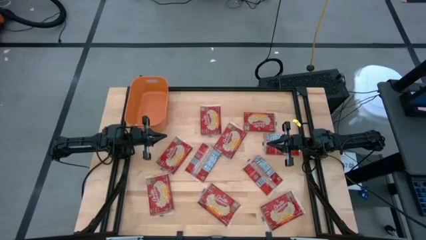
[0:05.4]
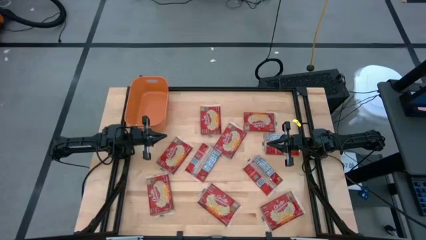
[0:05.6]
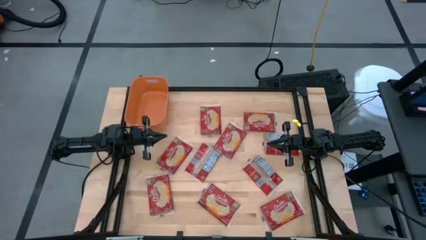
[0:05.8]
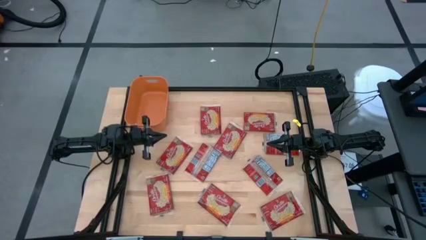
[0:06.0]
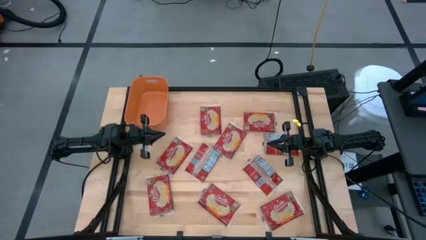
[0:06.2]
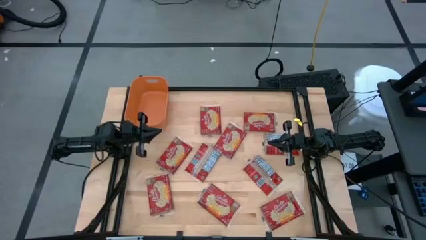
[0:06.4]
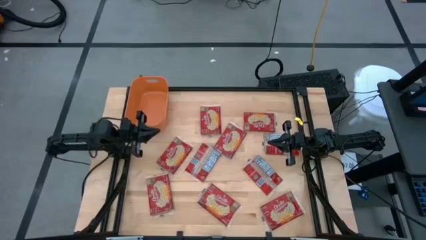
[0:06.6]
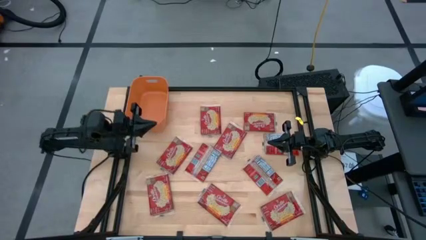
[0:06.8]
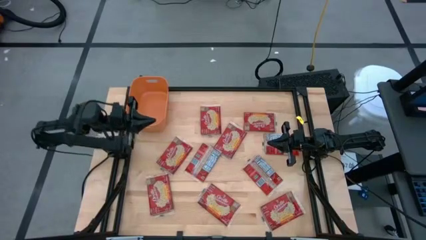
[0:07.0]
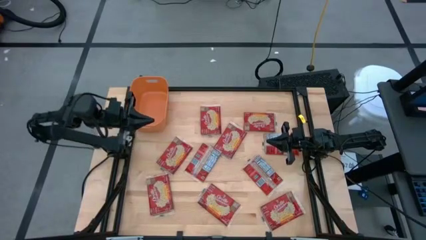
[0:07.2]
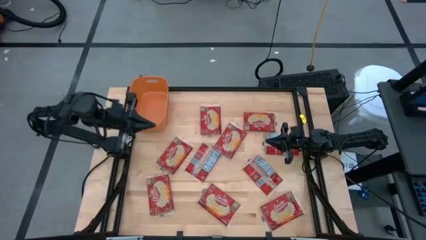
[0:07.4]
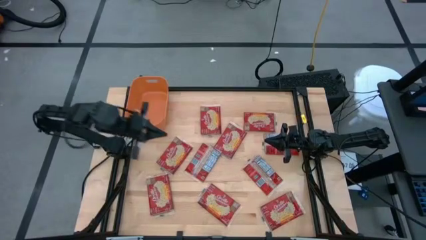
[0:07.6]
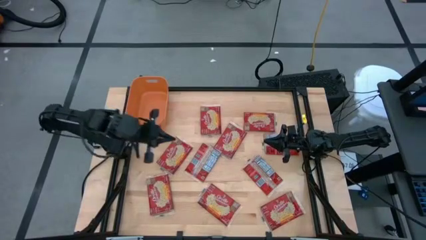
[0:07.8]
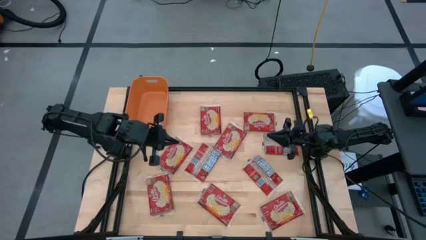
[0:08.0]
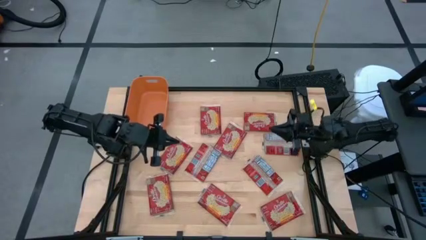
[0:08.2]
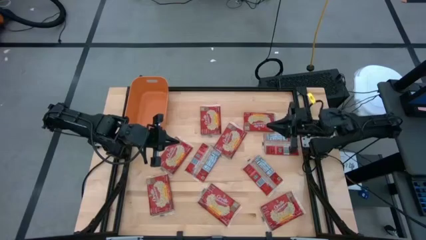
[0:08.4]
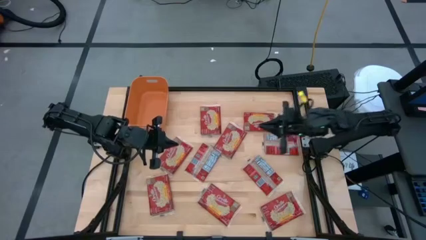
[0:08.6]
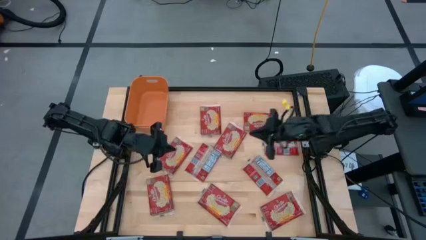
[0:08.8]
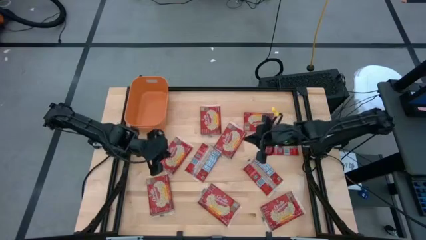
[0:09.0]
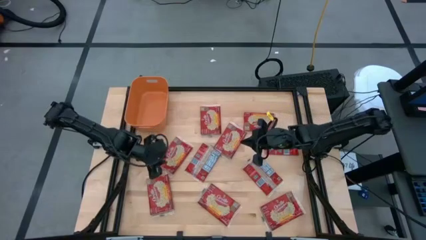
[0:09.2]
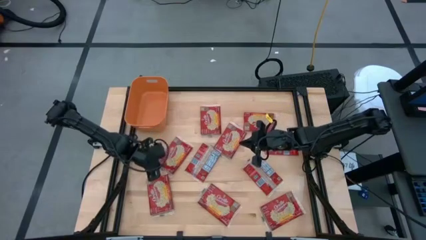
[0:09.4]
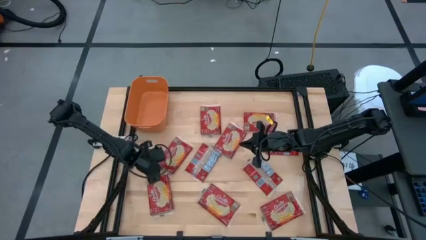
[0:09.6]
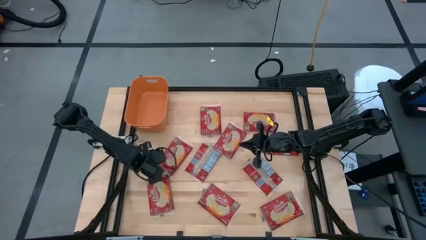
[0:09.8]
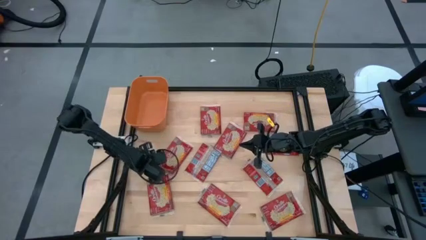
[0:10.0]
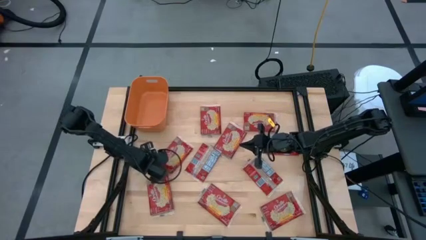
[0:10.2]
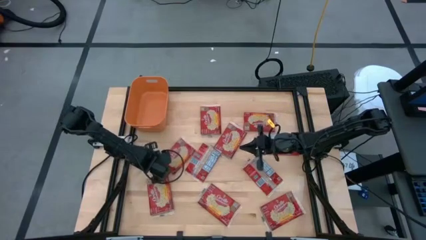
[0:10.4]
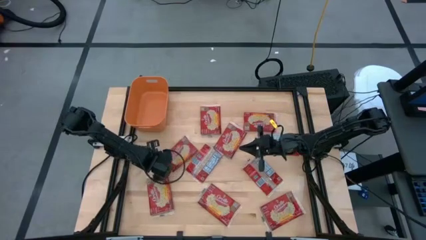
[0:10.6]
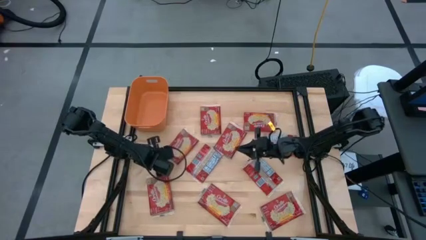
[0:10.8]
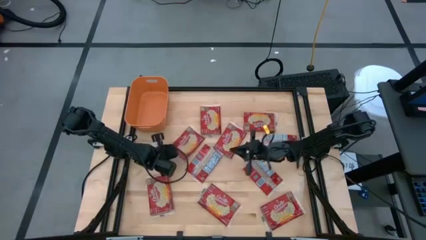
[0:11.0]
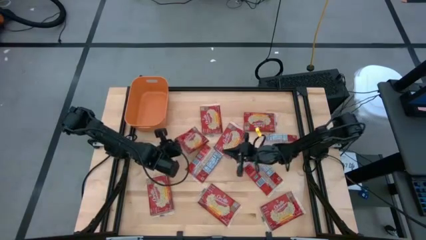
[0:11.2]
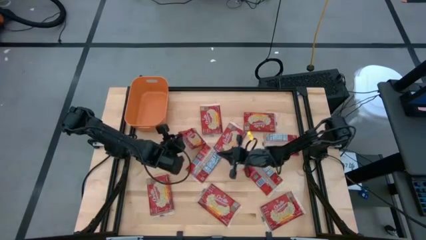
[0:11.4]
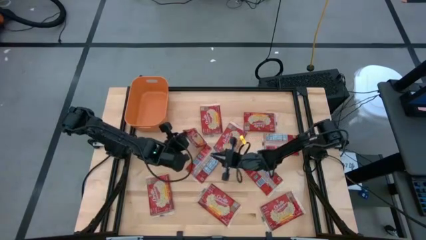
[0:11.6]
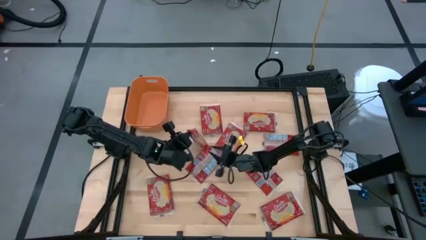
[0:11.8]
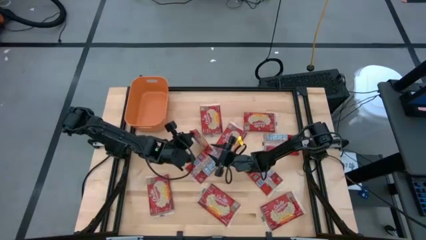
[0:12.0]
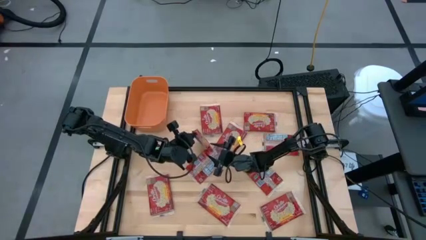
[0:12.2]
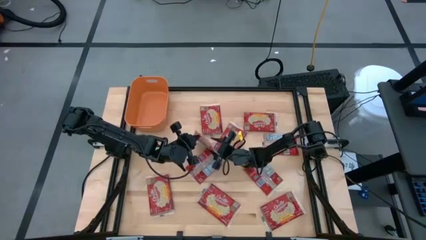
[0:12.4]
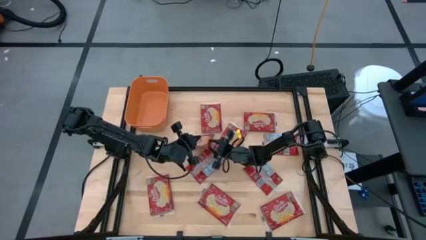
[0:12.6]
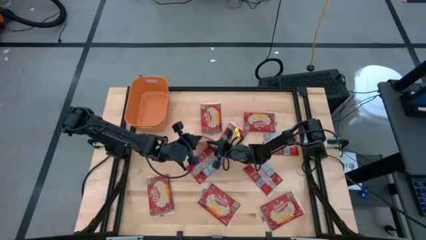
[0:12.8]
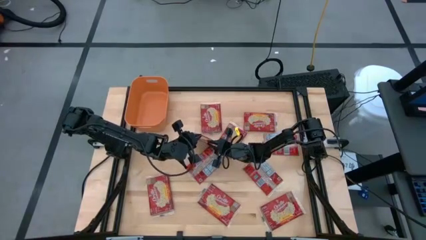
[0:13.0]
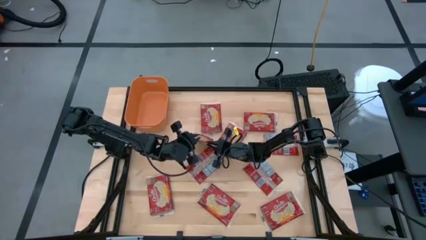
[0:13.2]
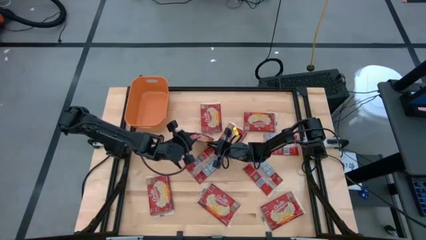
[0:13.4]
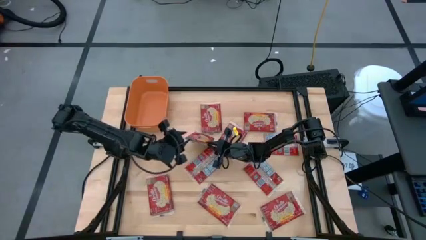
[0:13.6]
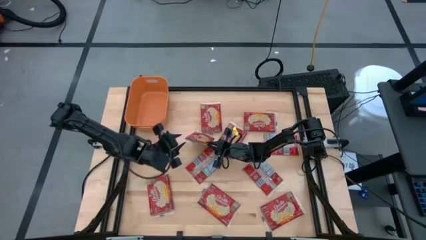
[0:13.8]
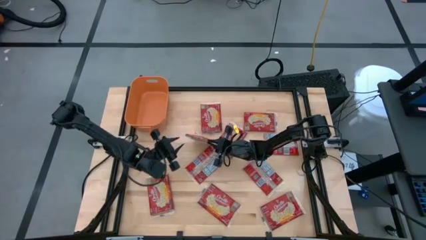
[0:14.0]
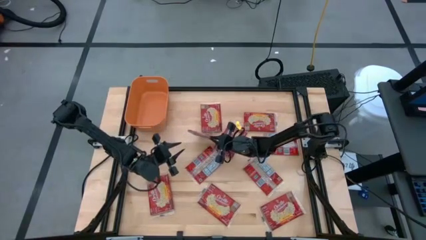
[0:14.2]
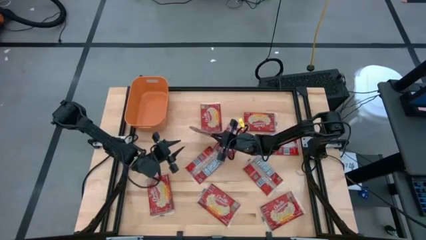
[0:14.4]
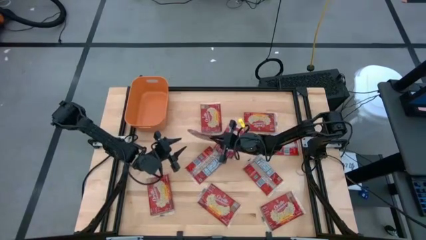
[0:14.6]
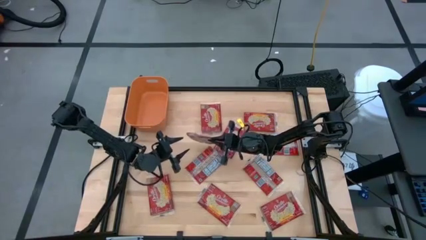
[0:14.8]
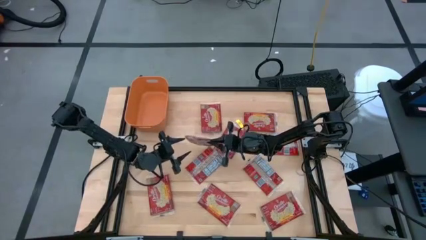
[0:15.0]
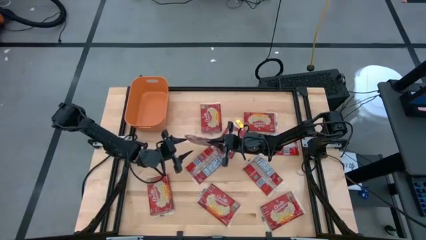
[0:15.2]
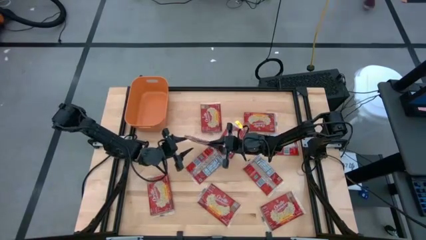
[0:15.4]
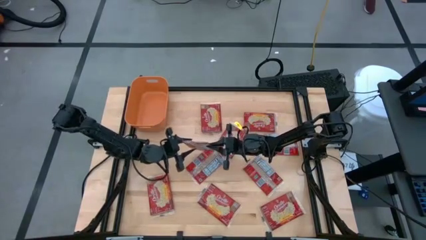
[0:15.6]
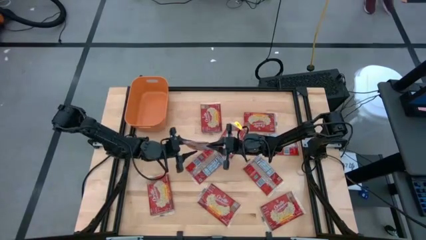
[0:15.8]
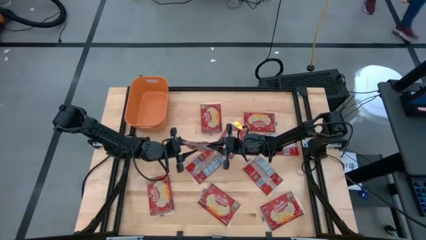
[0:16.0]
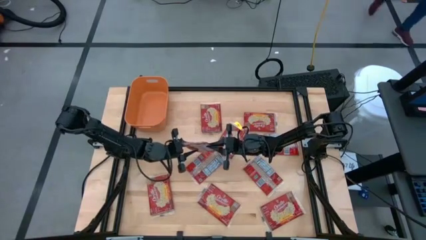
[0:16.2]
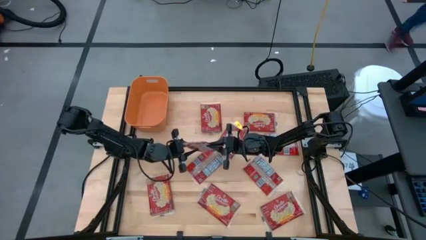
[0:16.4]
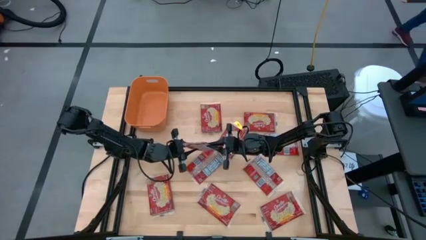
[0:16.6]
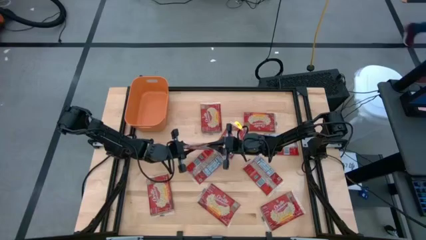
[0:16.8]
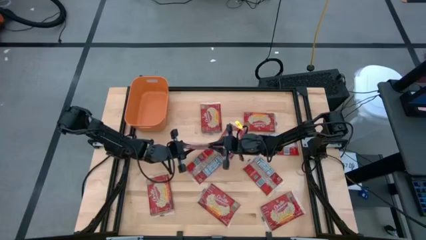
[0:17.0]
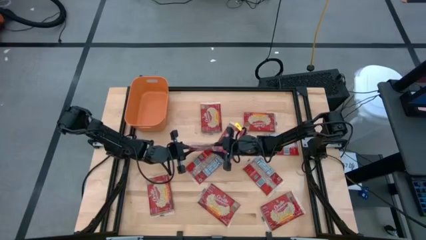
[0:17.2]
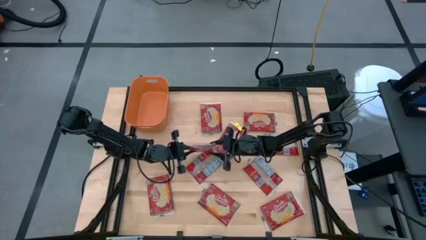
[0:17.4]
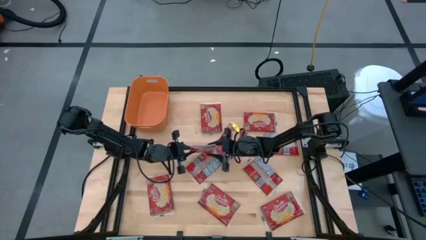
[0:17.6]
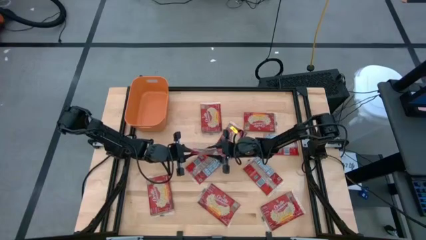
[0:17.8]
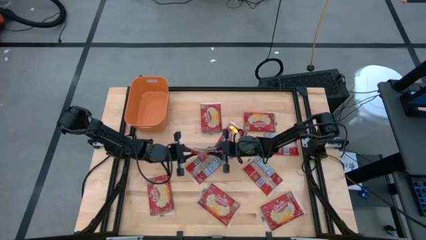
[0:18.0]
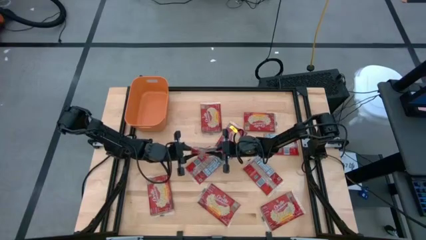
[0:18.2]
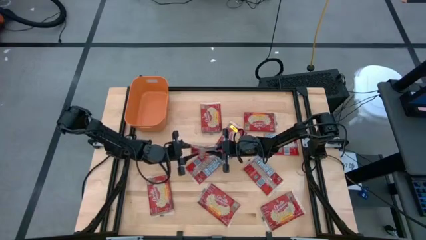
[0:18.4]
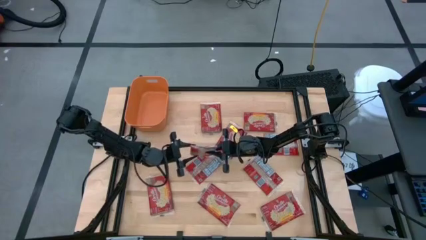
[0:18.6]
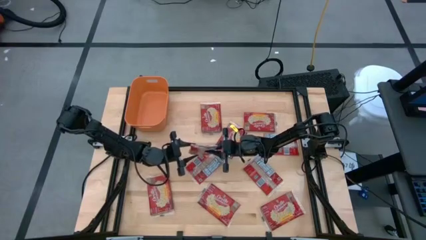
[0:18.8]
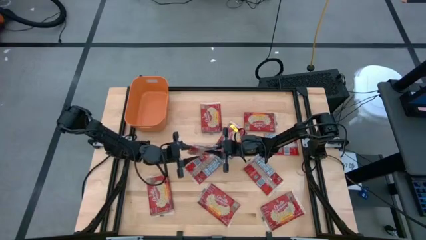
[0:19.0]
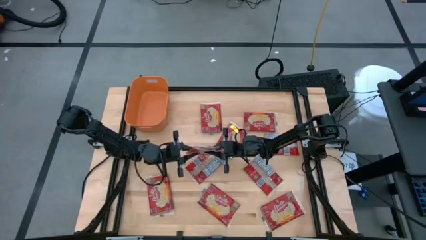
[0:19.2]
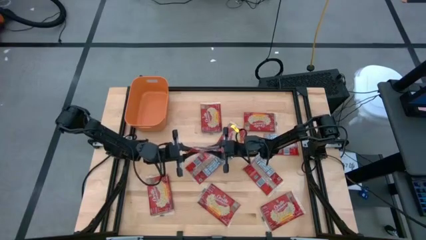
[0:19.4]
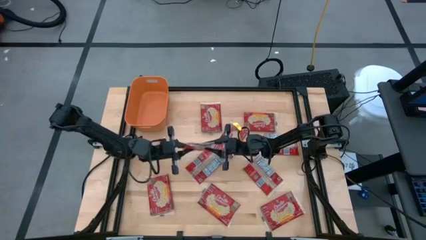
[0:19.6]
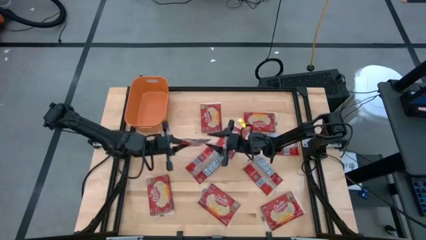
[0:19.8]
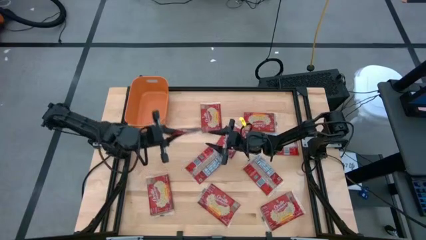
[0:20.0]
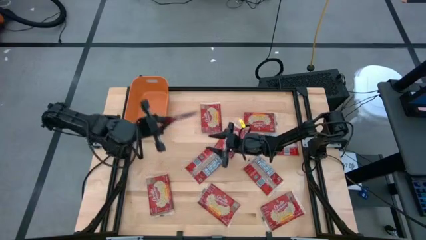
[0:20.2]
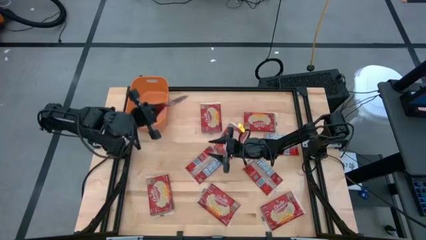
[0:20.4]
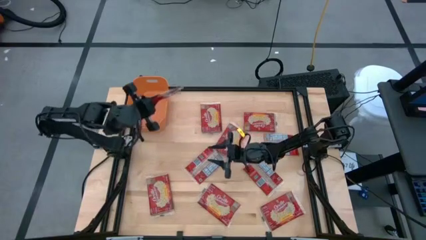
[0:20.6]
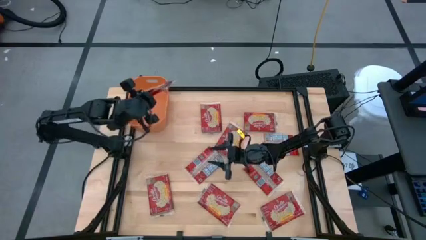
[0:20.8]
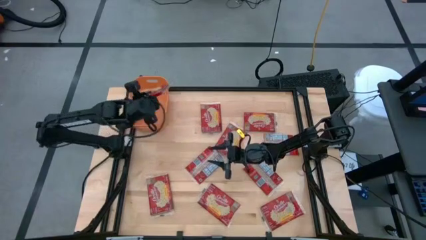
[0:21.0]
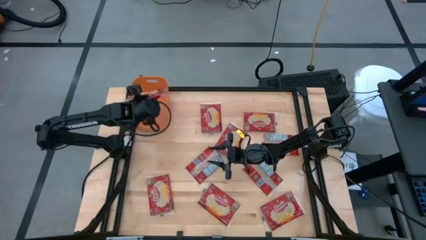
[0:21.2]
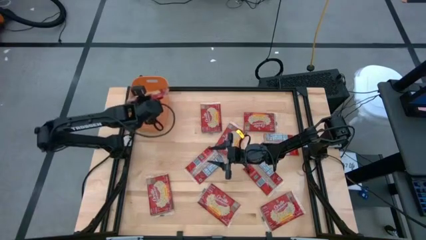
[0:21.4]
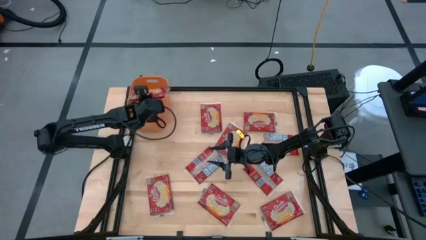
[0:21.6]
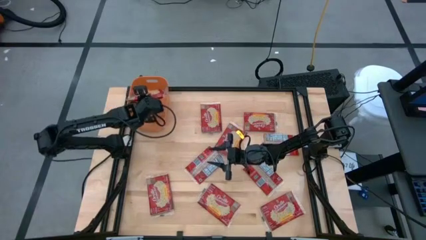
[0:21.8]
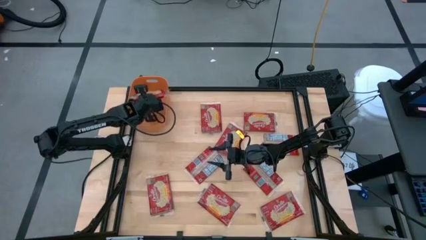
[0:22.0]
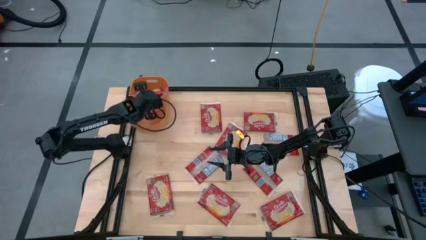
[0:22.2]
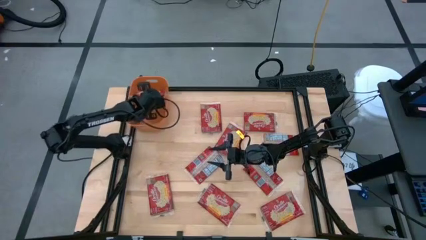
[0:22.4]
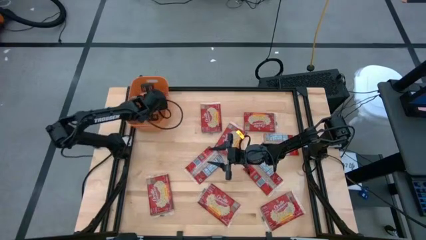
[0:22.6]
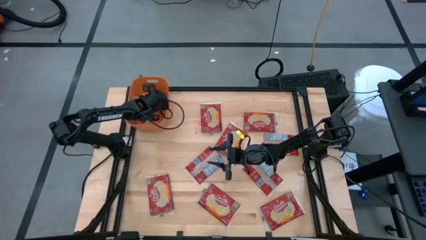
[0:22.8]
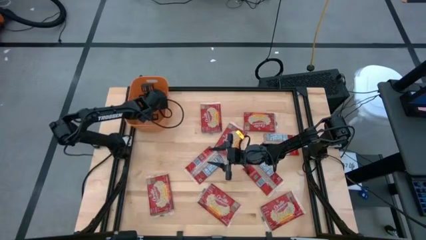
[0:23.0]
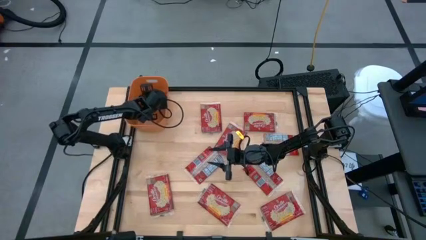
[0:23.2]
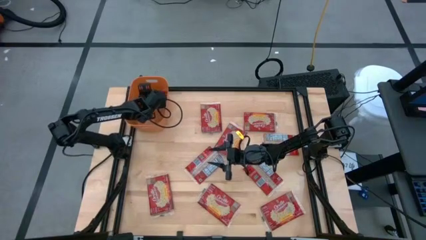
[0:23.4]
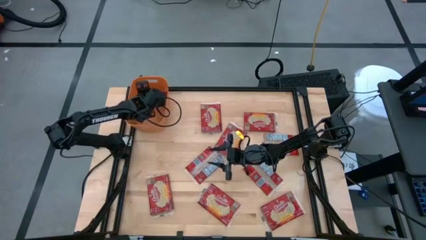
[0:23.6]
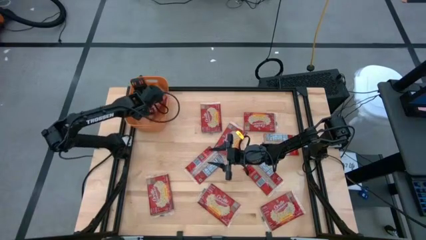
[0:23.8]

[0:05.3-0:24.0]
Task: Sort popcorn bags into baskets
Put the red popcorn bag into the orange bin
